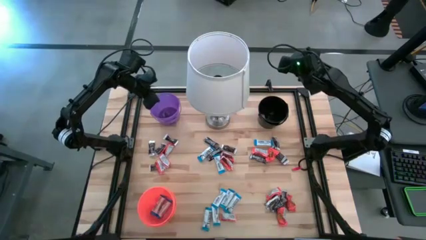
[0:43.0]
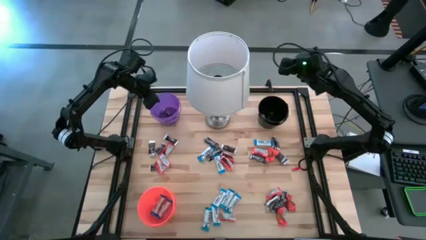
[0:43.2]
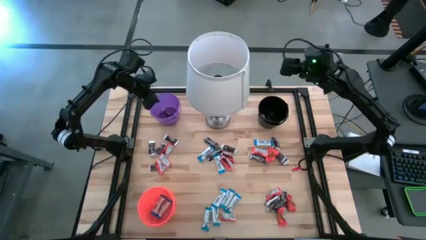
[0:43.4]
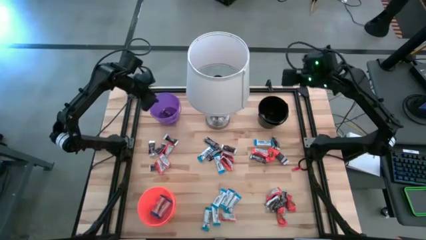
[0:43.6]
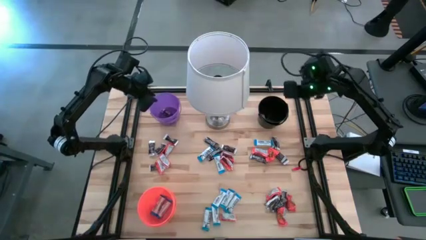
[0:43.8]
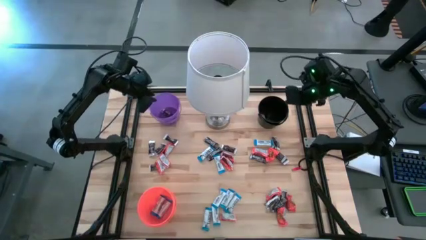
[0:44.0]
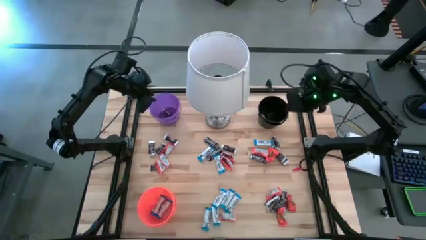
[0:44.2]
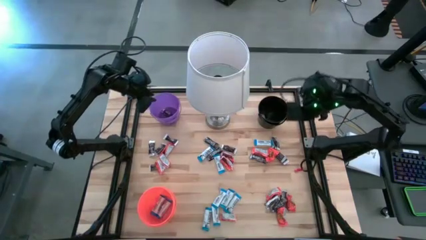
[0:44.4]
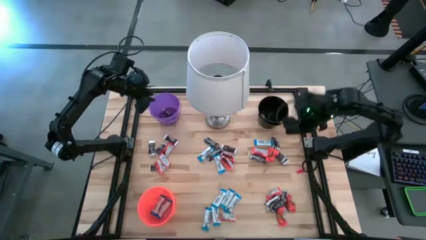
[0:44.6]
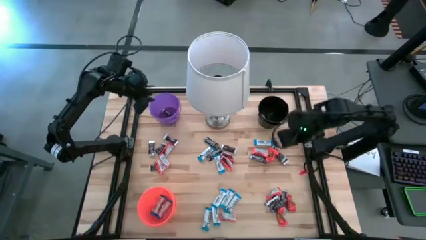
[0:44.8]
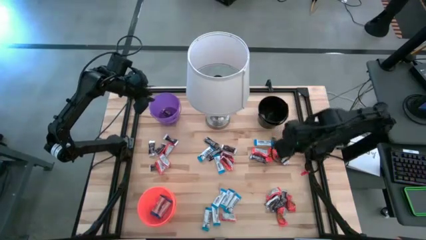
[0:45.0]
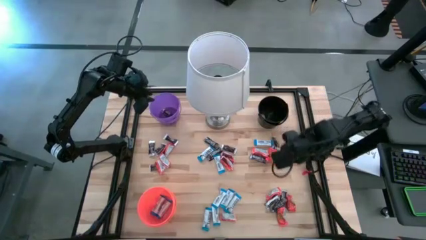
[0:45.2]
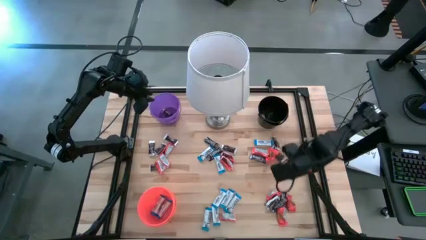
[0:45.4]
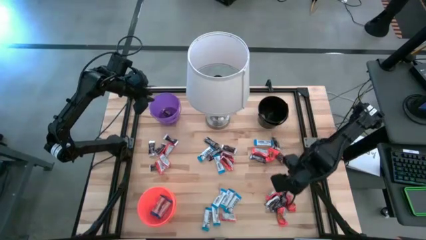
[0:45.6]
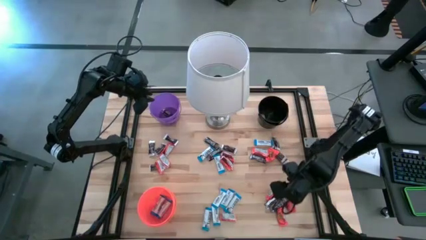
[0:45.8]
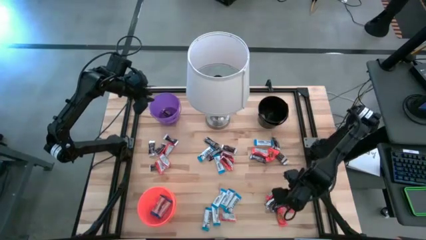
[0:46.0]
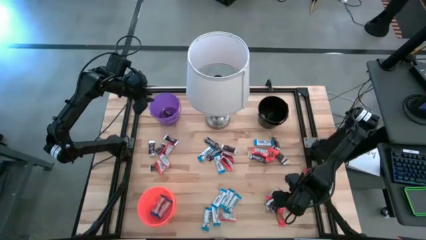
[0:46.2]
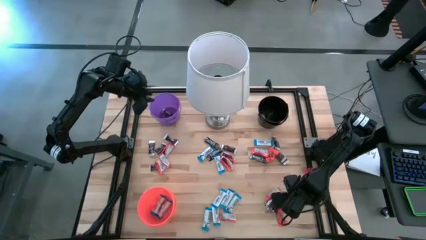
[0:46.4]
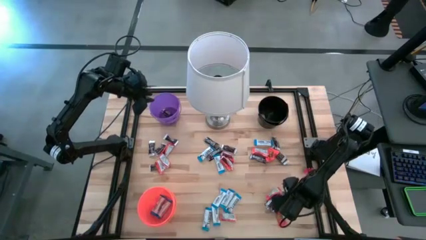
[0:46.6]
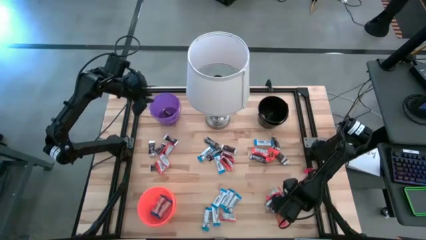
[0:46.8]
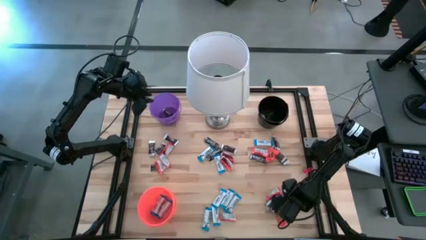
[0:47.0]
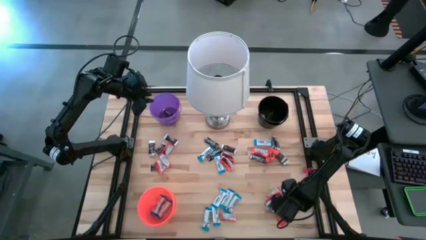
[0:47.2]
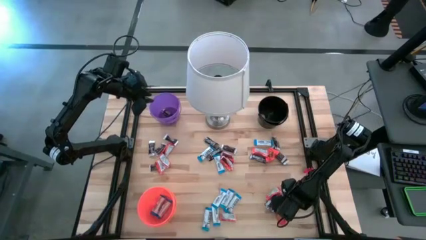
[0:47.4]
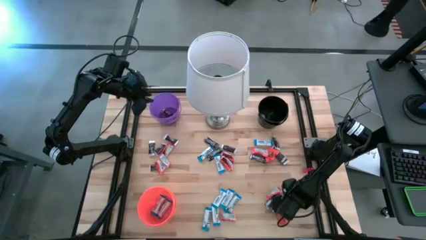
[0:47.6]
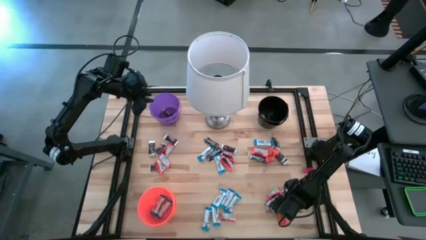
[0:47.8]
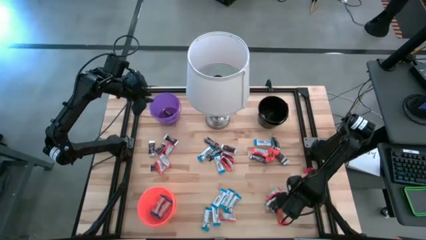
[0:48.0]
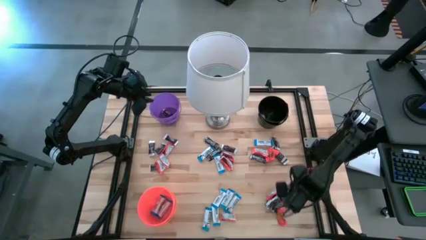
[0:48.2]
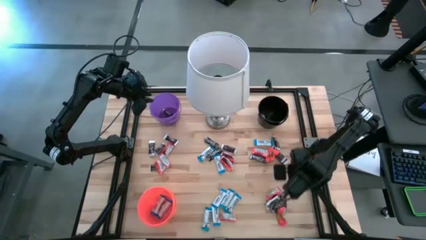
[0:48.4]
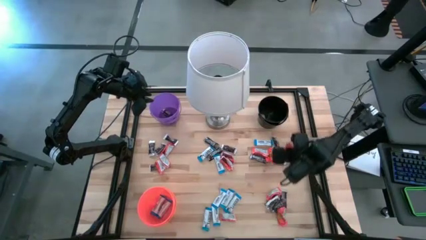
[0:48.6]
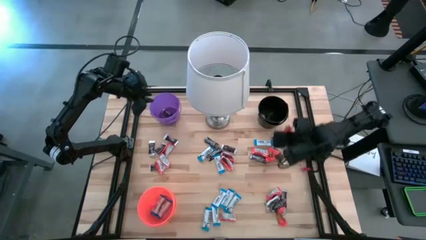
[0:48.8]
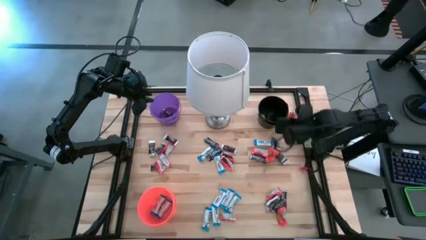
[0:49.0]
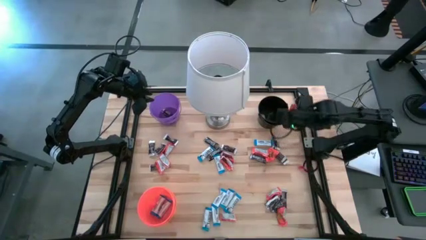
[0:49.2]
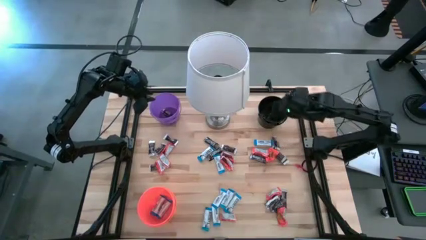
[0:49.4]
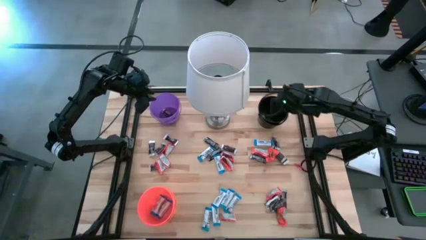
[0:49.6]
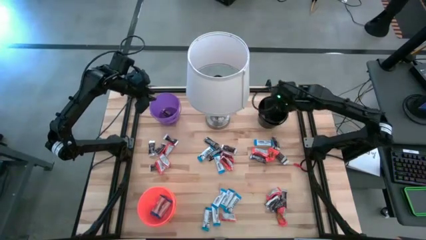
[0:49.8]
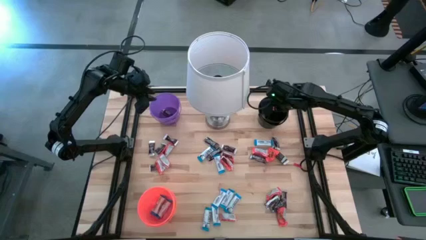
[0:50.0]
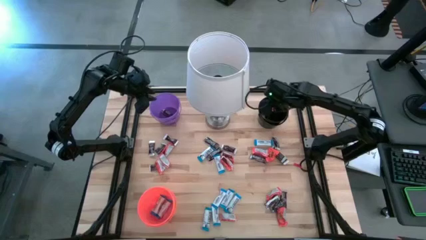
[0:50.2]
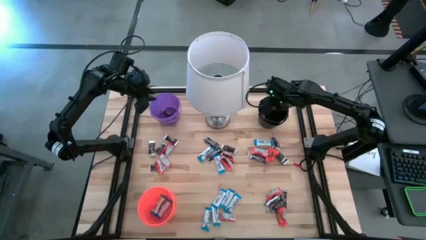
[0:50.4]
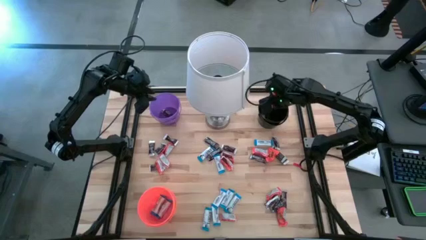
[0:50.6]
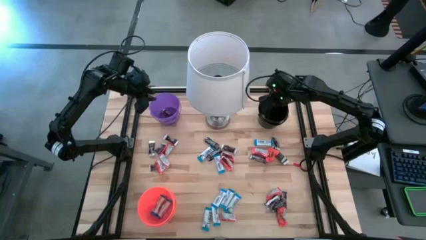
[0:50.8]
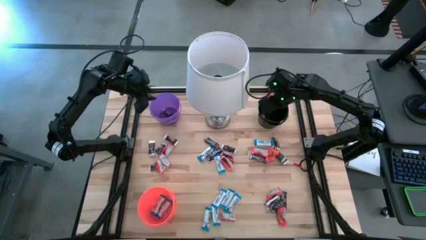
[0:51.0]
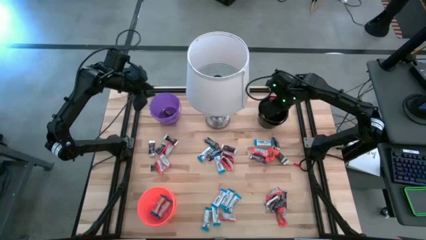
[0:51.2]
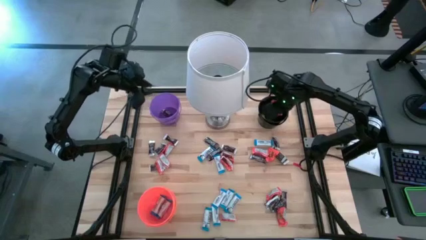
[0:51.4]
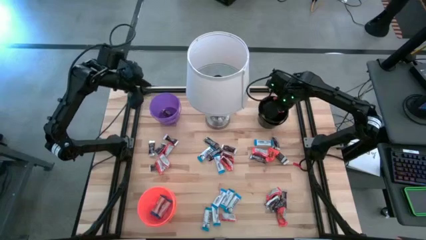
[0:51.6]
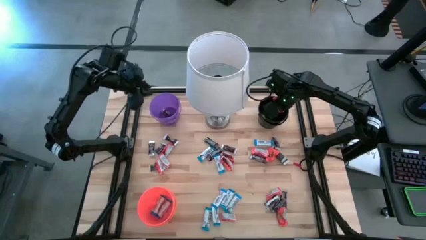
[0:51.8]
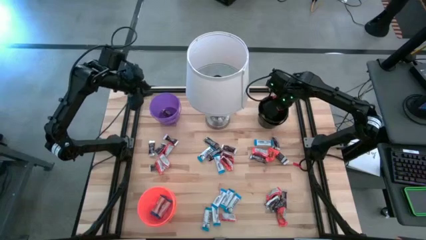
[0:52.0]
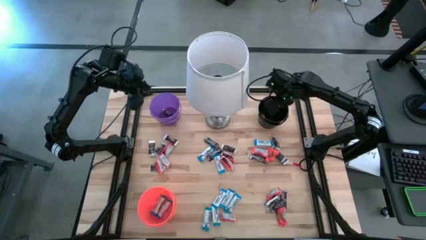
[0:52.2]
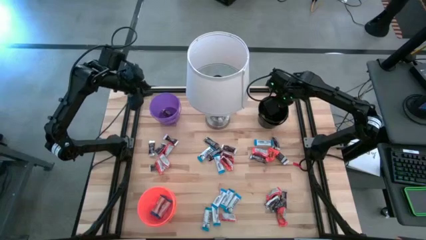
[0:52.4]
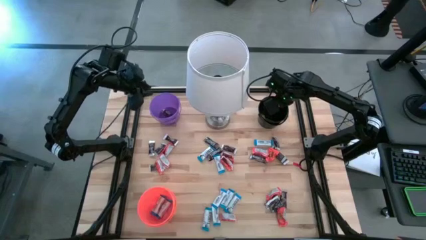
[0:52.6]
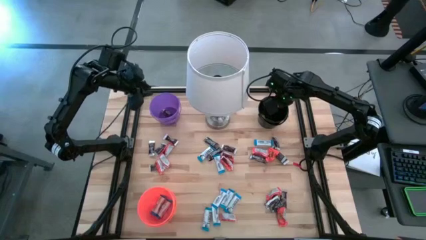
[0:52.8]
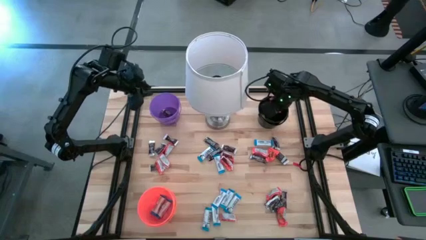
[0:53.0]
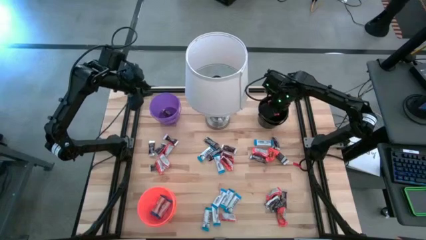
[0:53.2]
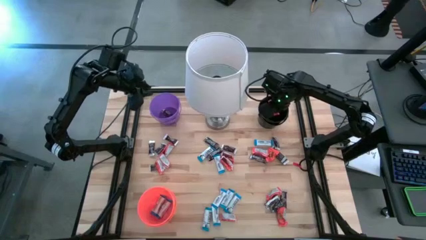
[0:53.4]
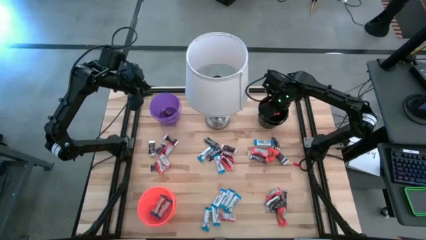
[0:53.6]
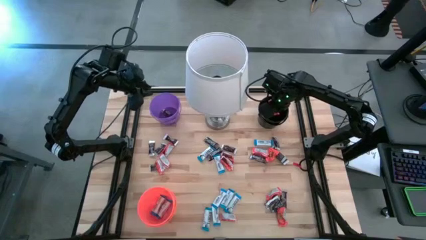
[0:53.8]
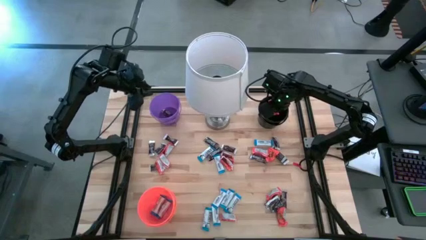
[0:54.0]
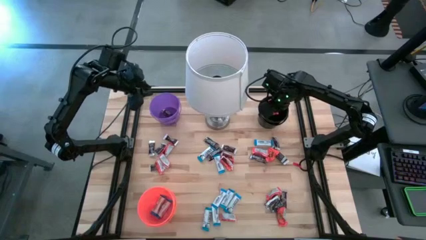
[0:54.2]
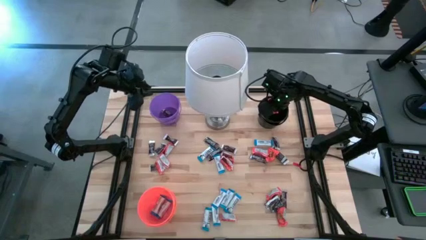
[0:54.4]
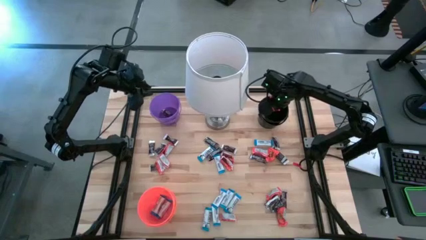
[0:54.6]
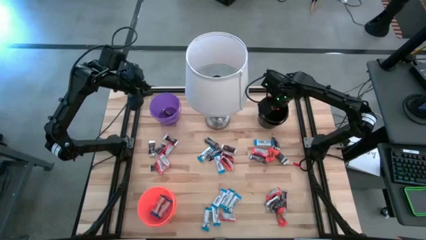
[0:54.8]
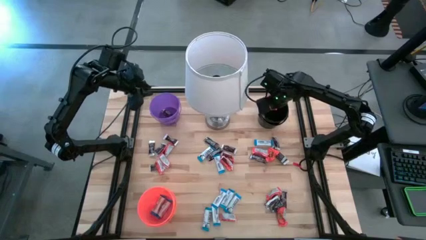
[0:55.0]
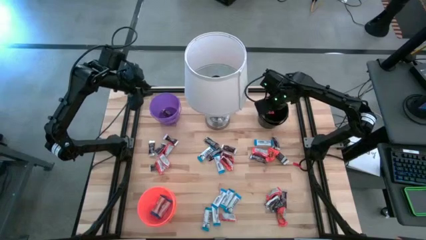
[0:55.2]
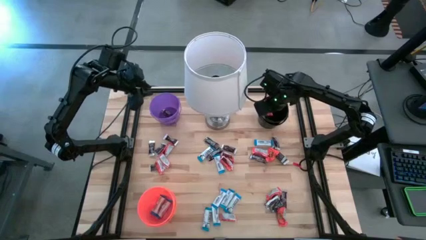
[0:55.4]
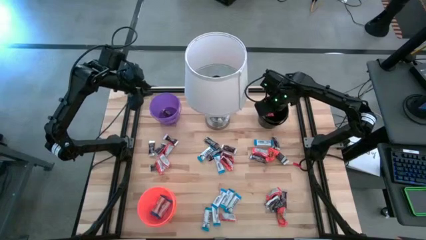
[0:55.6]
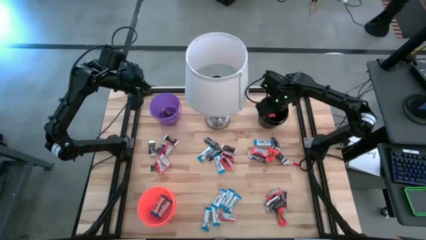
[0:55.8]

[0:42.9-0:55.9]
Task: Organize candy in baskets
Put the orange chocolate bar into the black bucket

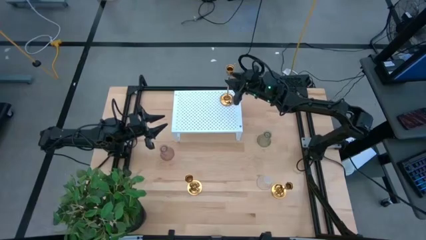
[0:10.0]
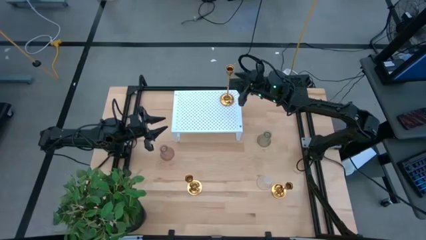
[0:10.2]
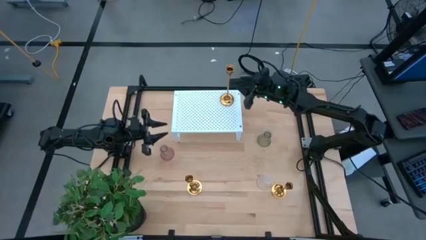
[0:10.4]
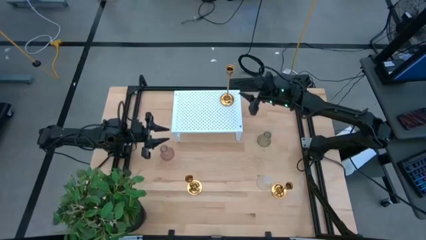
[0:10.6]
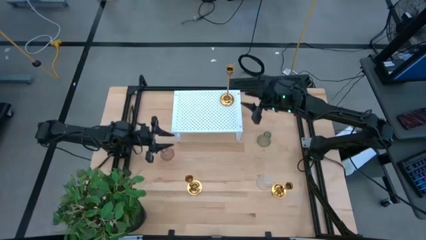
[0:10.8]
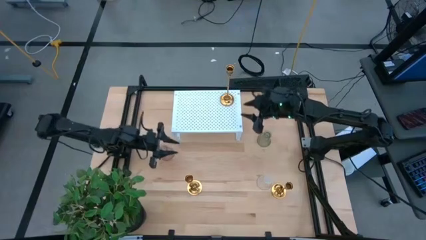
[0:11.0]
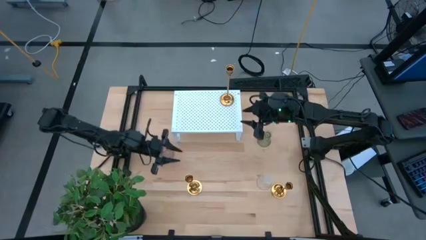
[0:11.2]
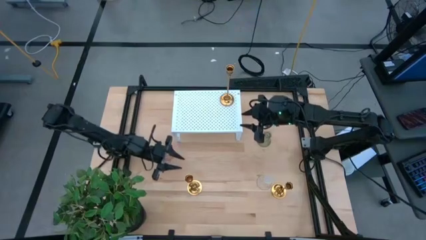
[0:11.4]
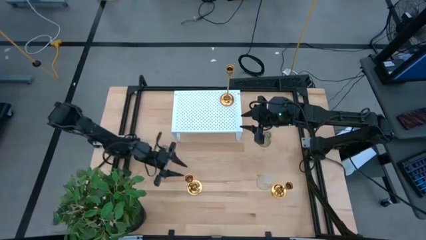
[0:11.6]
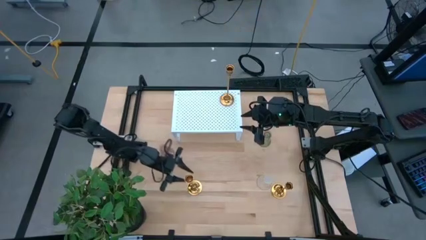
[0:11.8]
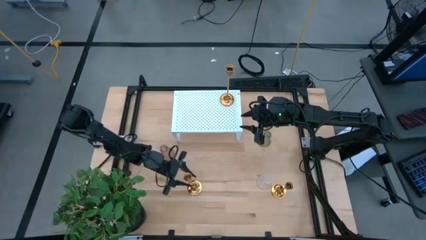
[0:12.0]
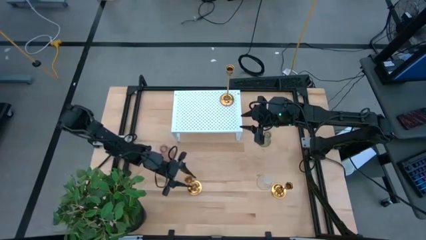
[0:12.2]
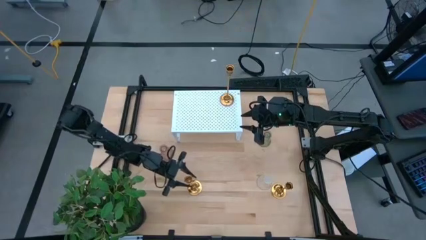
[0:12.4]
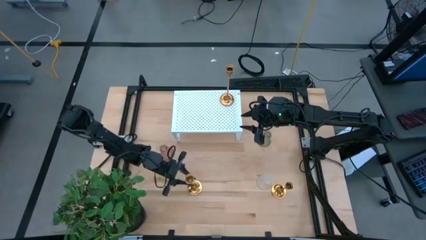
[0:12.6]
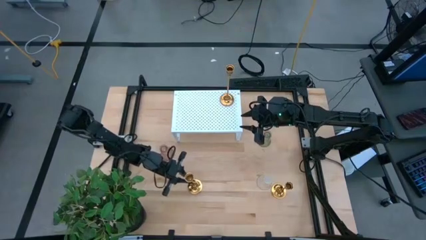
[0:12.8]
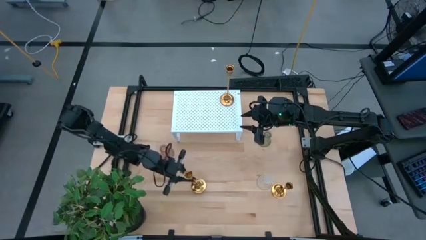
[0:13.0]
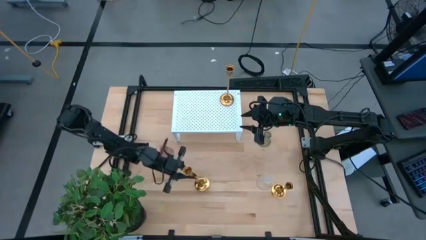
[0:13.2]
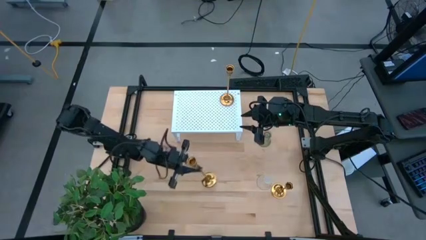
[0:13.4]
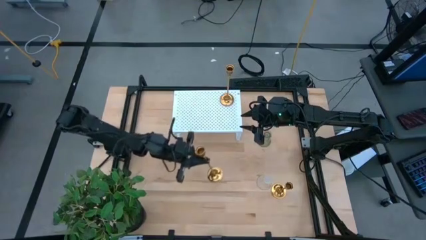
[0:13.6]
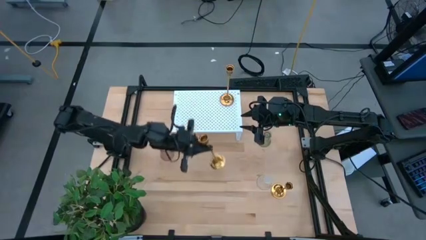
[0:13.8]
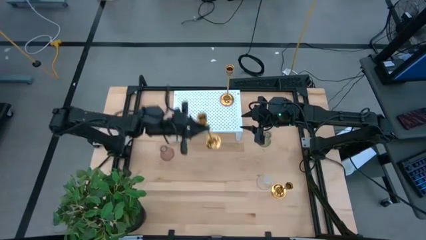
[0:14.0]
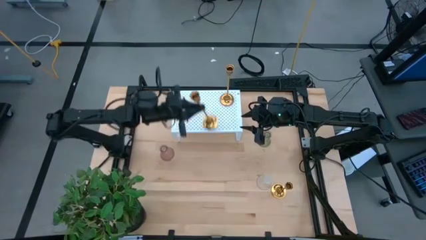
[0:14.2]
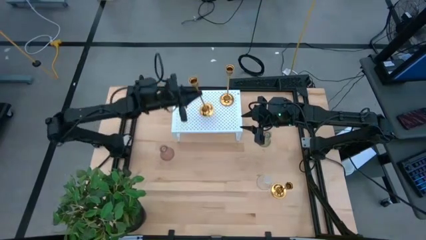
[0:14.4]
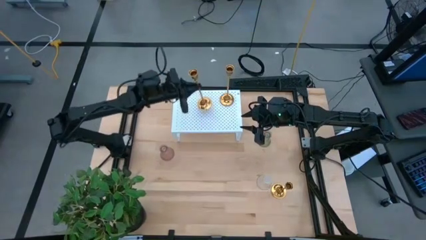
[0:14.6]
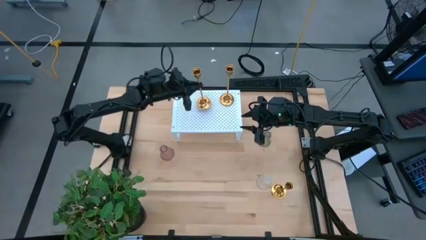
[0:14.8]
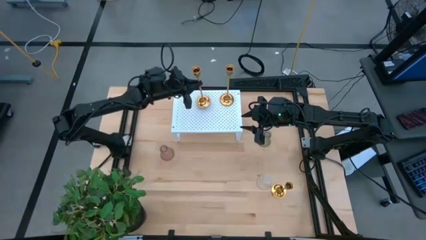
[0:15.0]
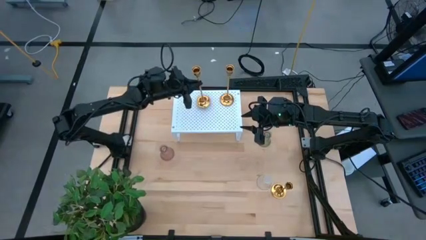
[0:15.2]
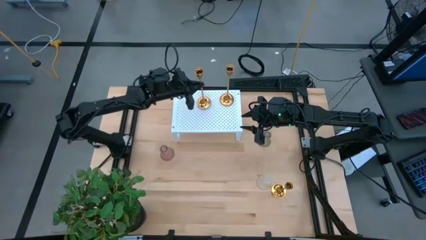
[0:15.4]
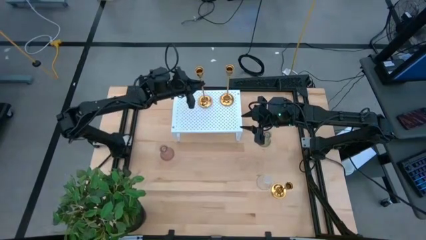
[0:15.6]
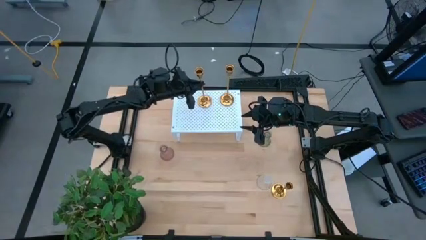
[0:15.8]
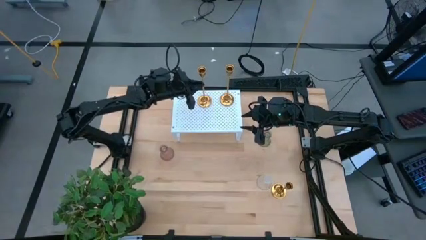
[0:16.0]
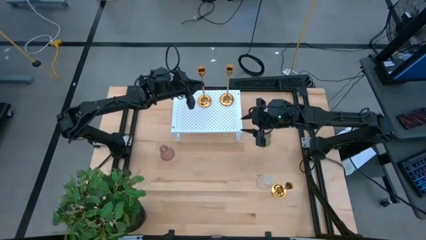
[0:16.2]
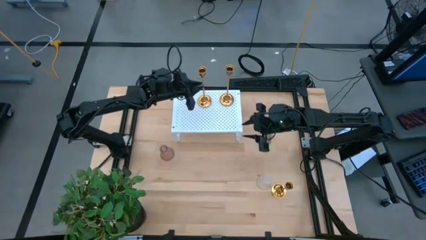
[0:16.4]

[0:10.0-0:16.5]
Task: Pick & Place candle stick holders
Put the large gold candle holder on the shelf aligned with the other gold candle holder
